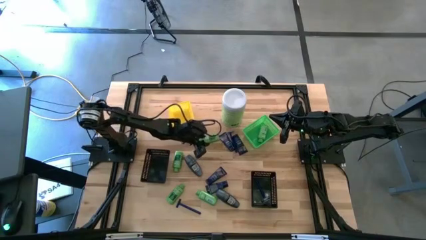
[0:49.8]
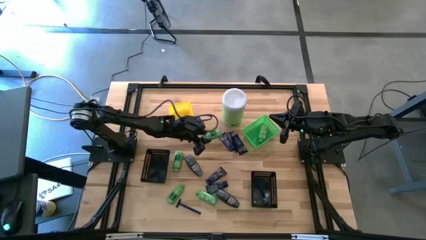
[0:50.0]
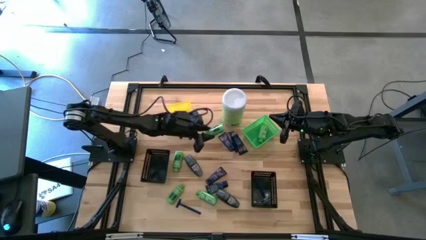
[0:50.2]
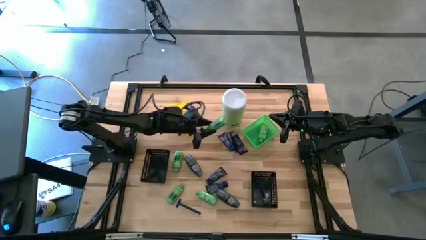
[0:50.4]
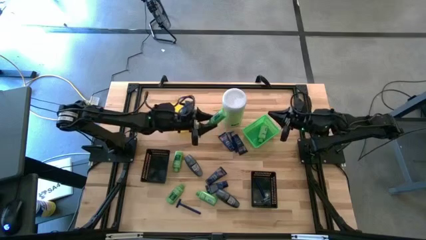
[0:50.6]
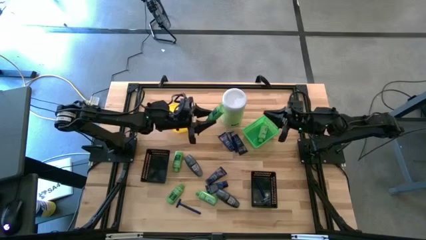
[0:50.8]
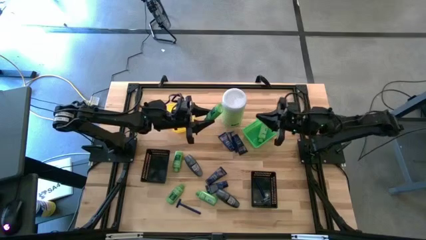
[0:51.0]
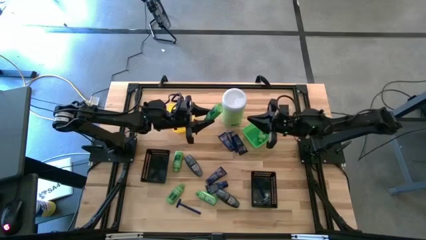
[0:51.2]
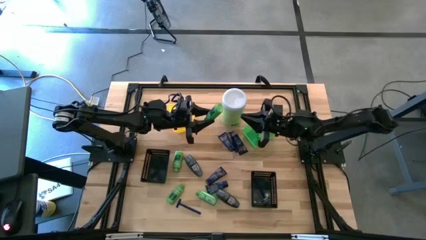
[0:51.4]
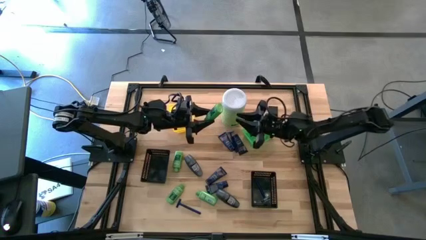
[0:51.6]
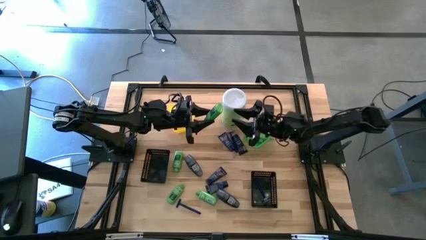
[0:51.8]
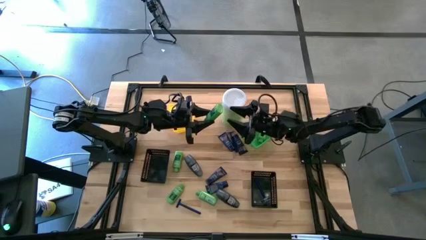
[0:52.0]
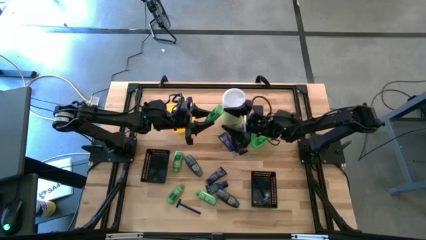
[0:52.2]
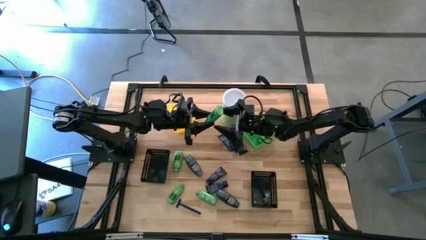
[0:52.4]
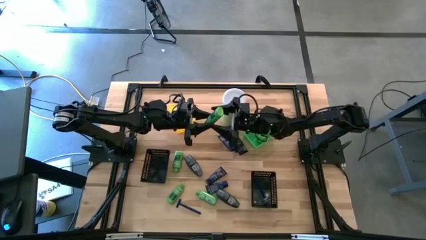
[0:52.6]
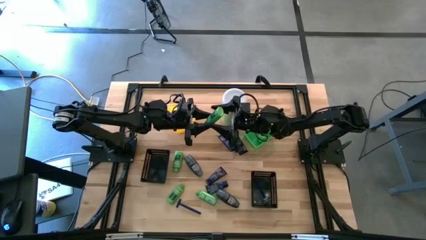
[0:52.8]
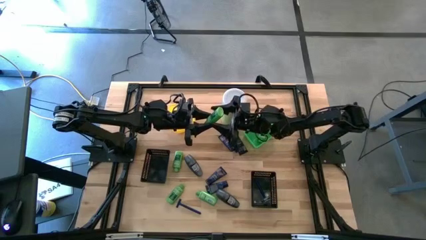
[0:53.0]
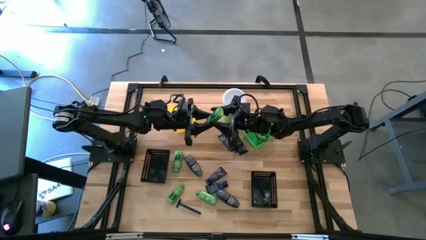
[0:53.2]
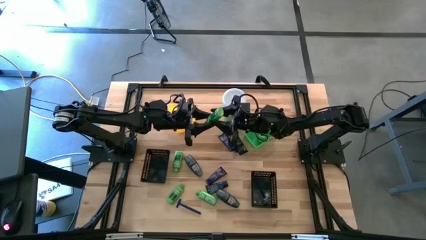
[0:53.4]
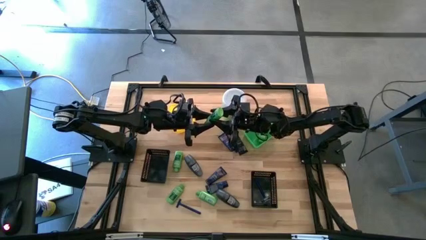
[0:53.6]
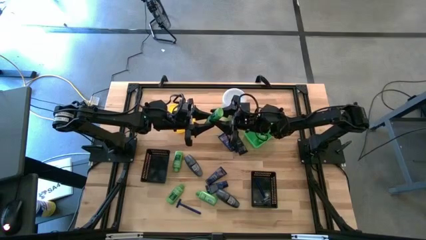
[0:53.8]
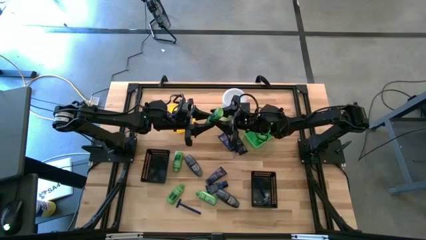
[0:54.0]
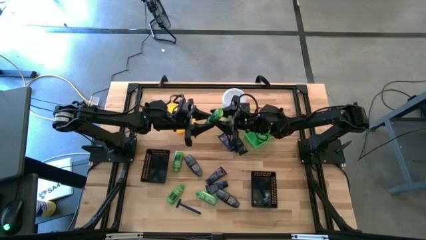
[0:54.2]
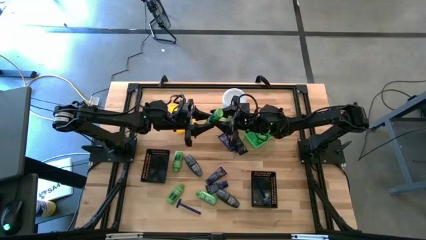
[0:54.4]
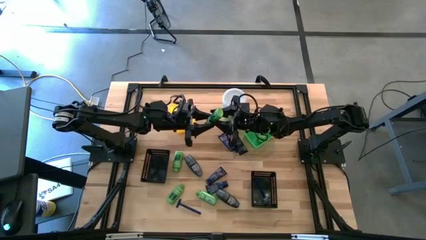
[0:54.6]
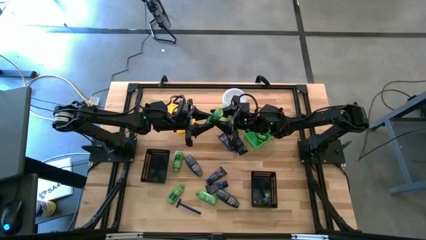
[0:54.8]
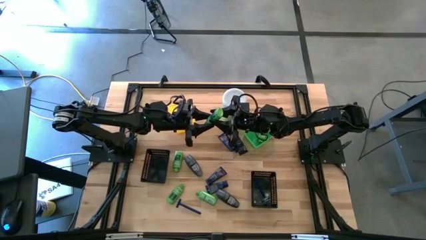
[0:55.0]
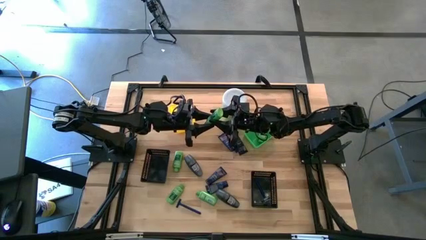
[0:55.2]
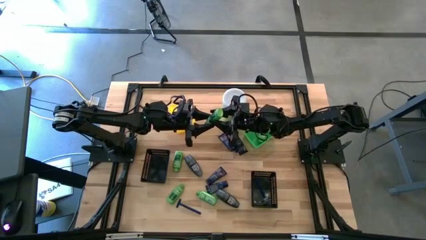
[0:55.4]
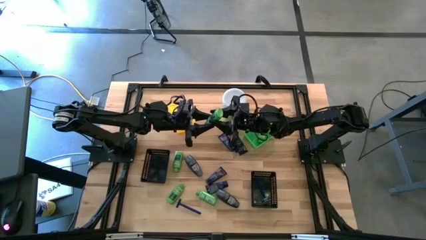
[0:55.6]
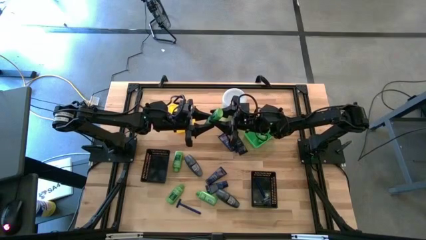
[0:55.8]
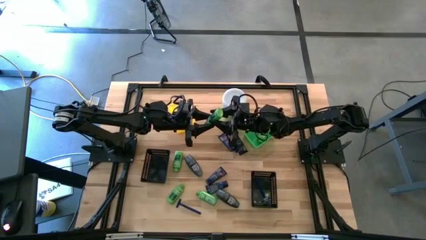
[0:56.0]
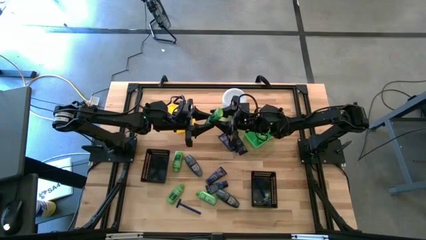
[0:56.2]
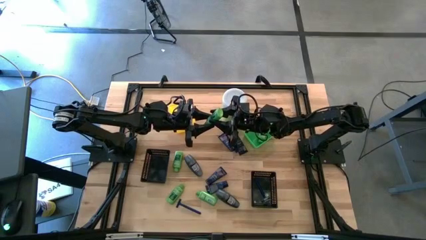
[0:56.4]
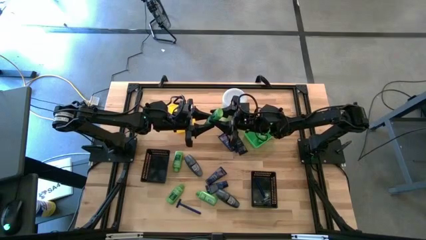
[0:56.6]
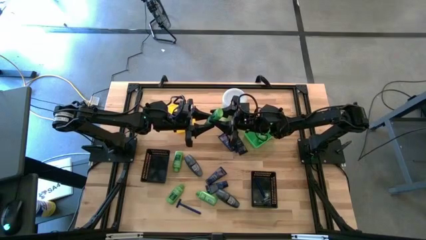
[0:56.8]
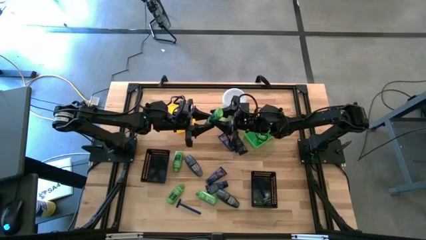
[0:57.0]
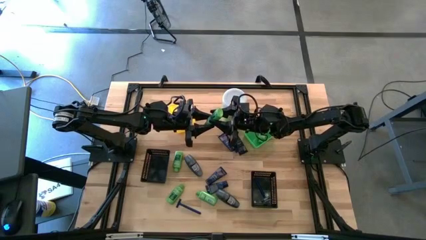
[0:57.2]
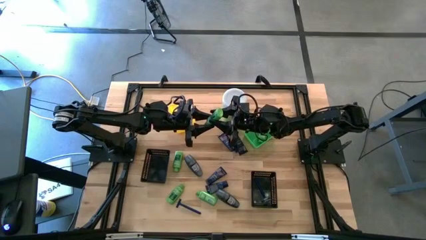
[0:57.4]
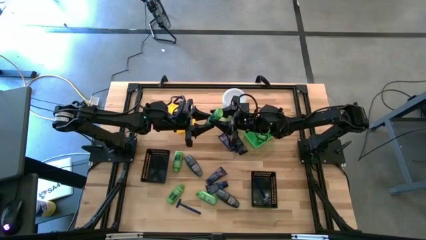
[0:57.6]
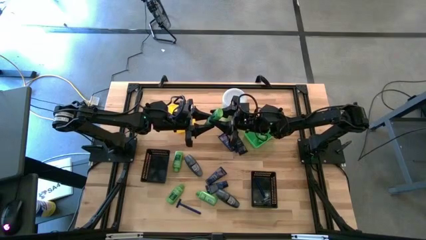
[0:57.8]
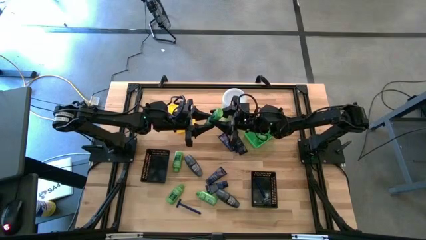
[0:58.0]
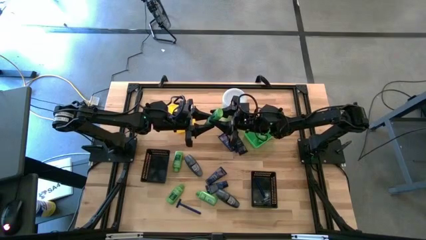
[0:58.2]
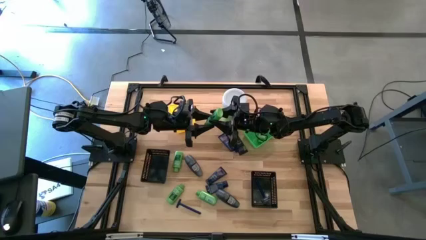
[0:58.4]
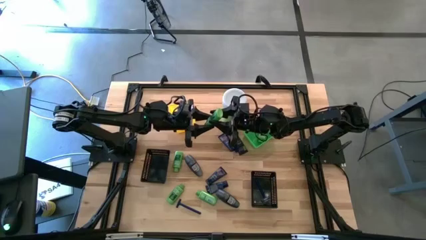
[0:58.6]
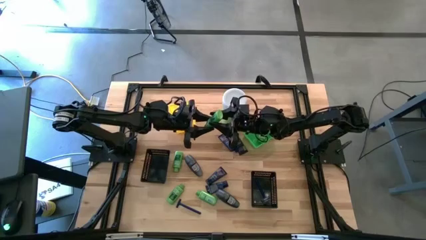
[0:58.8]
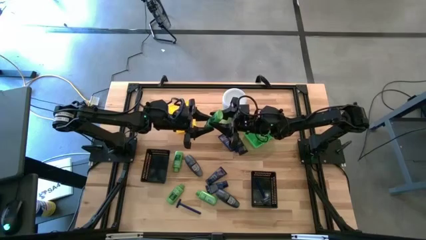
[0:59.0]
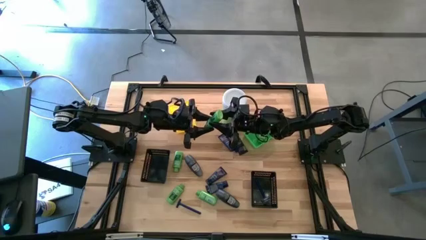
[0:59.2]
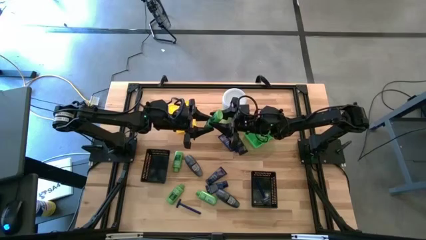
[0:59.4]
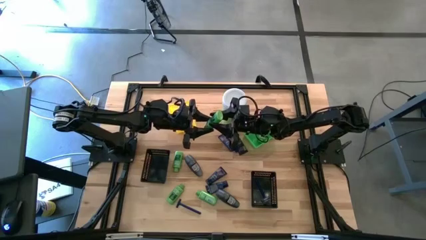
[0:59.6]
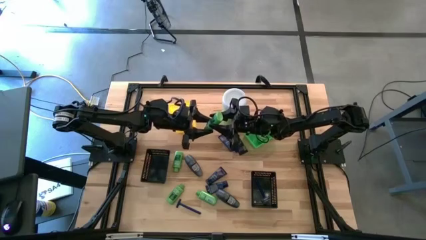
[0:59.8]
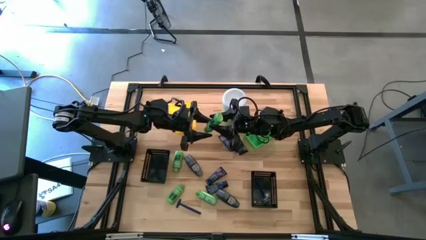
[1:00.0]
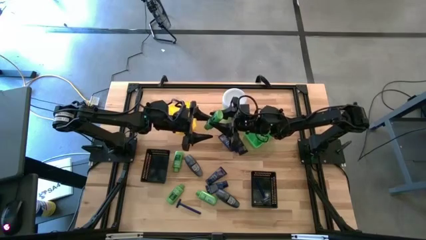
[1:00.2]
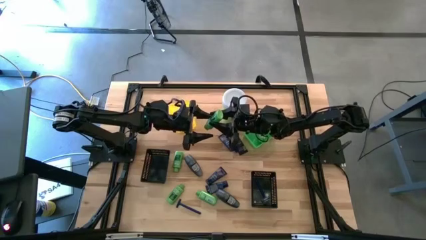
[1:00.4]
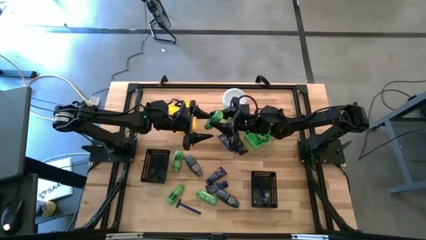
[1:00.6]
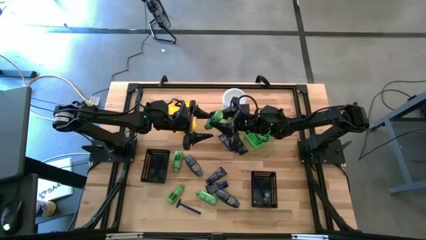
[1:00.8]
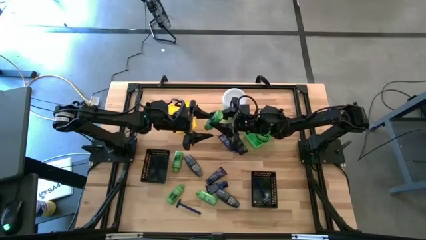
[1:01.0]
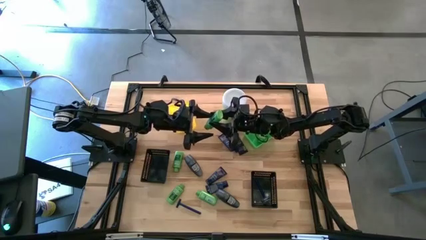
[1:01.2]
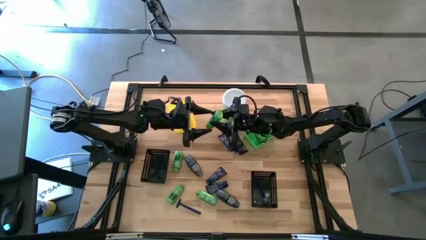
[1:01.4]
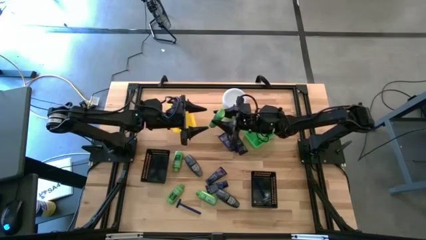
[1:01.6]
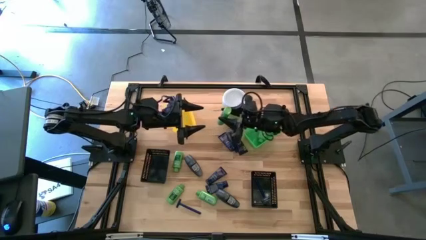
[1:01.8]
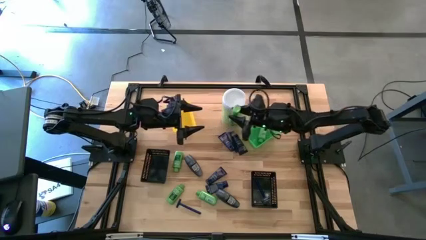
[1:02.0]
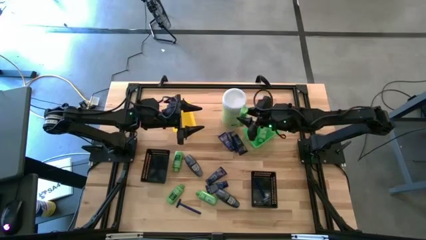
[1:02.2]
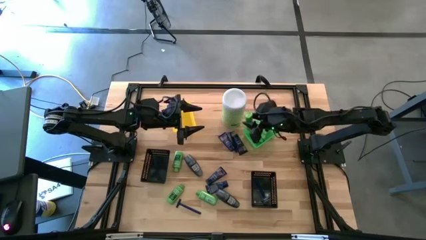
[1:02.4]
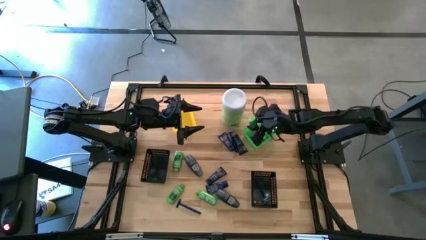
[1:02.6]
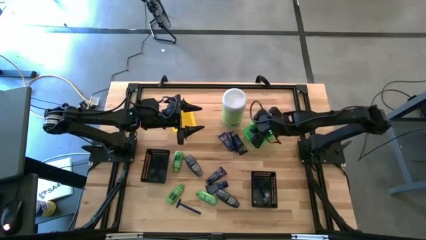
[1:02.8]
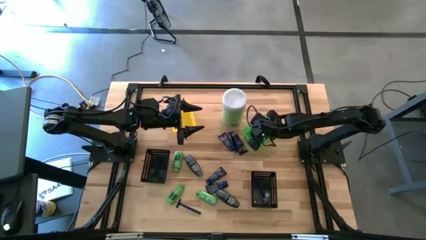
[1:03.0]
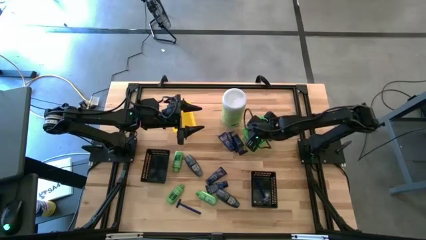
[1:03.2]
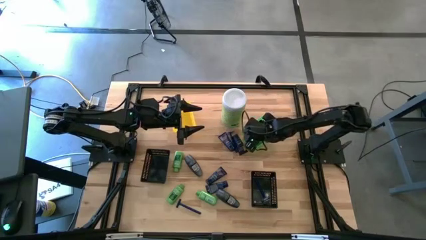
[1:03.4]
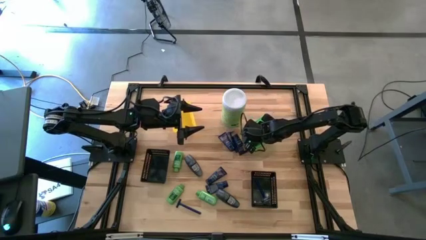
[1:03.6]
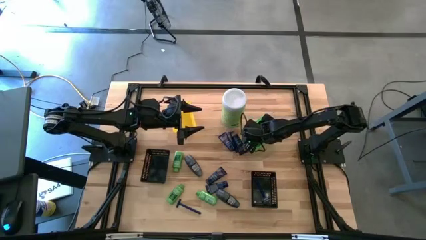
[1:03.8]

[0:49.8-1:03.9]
Task: Pick & Place Travel size toiletries
Put the shampoo bottle bottle into the green bin

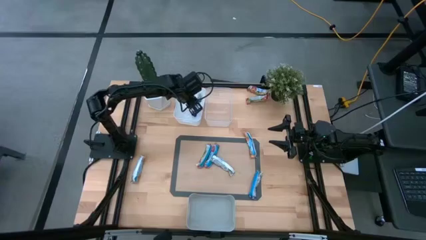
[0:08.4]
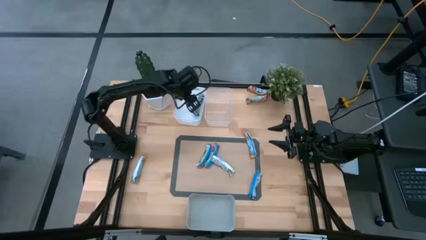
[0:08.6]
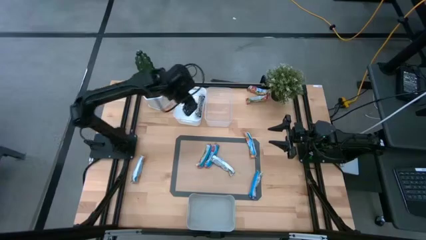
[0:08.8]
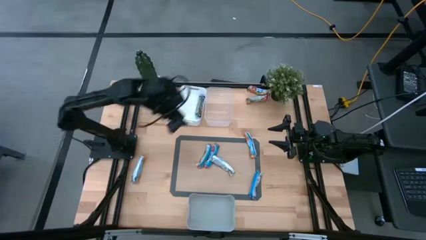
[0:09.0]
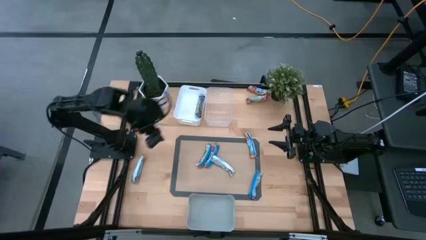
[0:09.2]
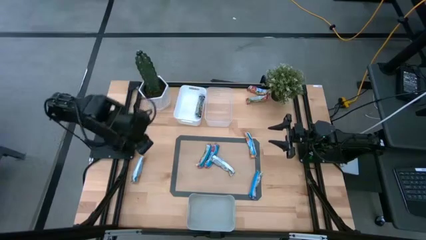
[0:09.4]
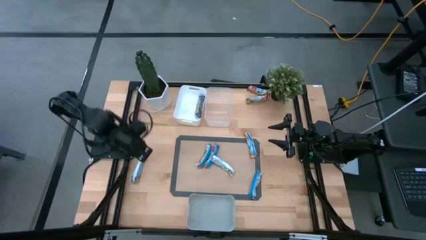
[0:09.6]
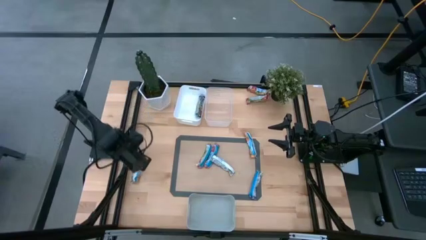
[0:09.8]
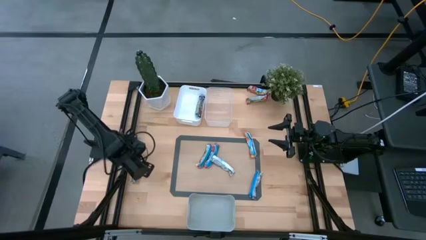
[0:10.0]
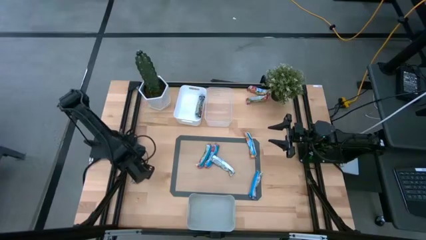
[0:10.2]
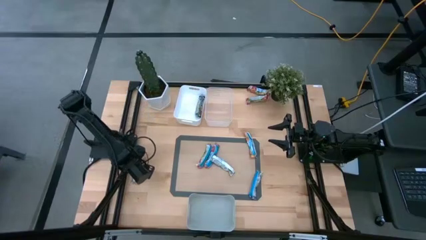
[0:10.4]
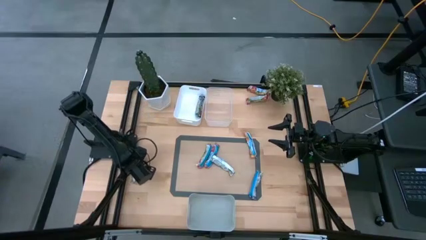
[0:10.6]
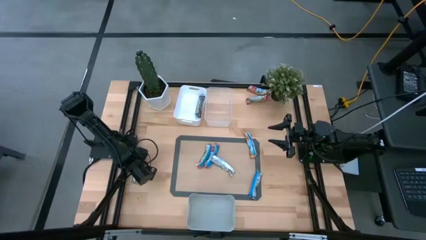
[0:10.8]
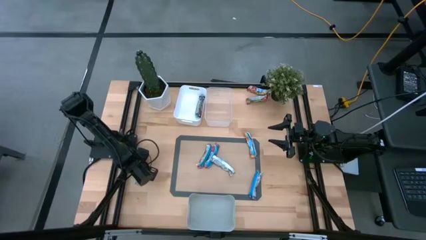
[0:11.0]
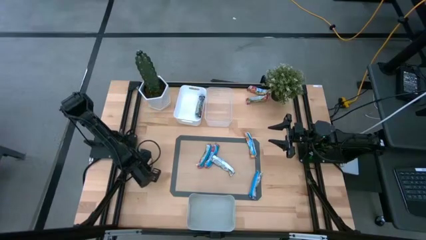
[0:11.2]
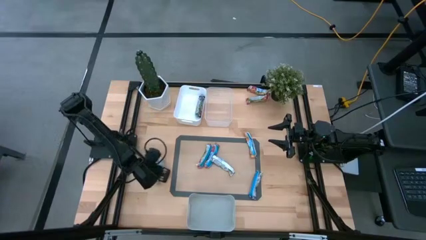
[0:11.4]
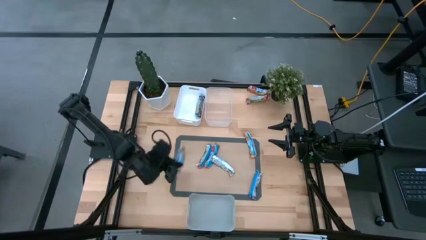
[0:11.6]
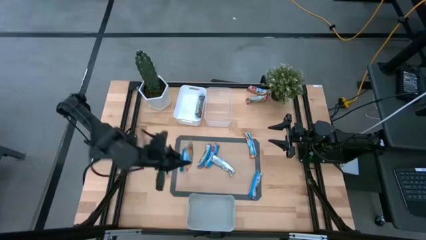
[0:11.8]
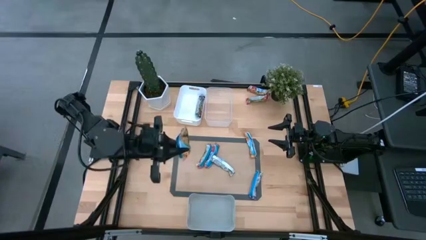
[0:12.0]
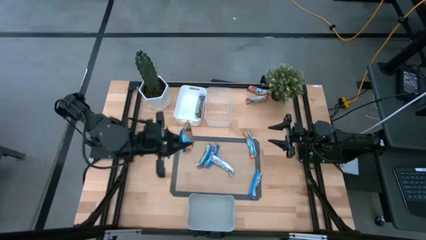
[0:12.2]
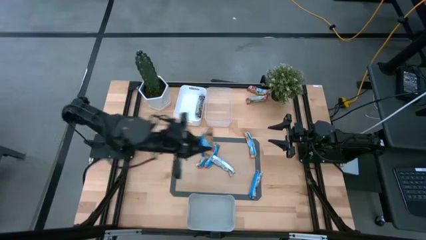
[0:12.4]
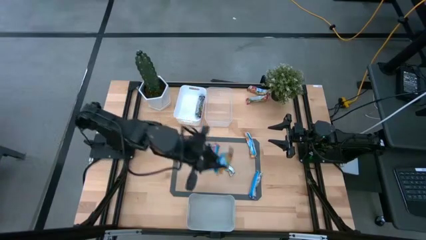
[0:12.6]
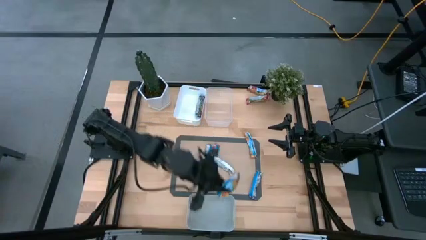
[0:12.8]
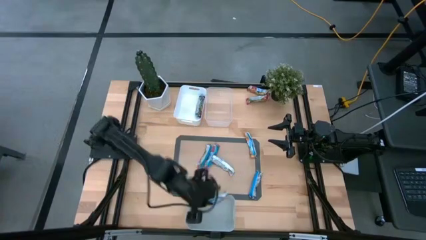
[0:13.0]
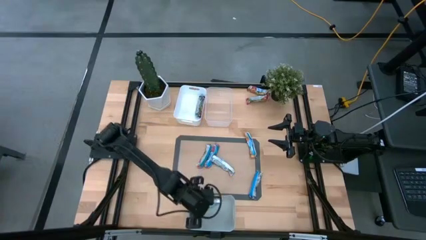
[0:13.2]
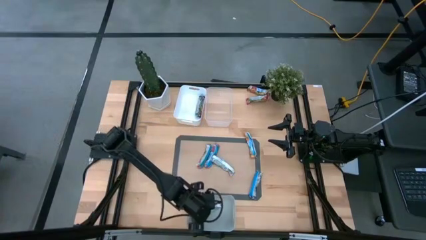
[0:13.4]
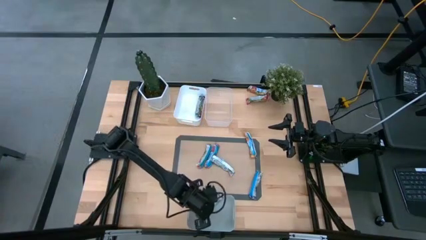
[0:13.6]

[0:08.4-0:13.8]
Task: Pick and place Granola Bars by type
Put the left yellow granola bar into the gray bin
